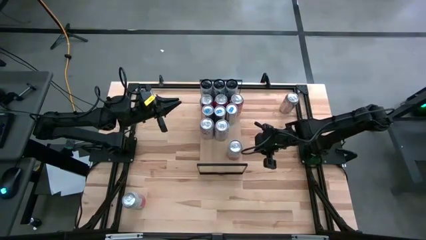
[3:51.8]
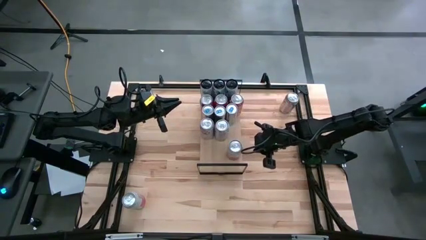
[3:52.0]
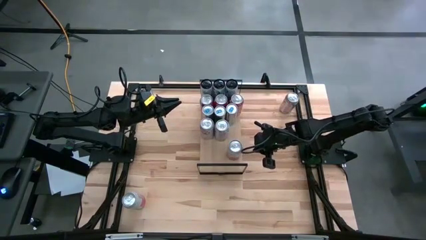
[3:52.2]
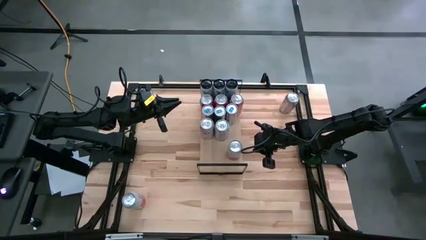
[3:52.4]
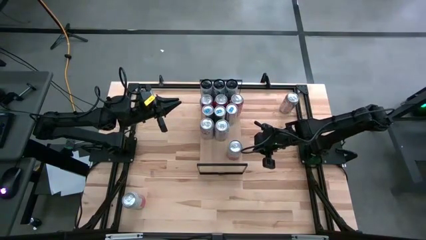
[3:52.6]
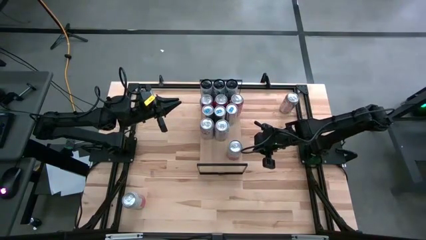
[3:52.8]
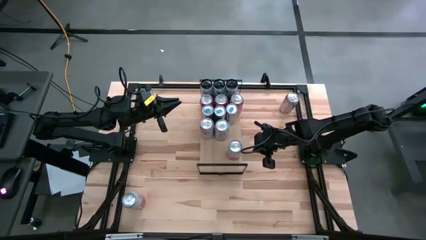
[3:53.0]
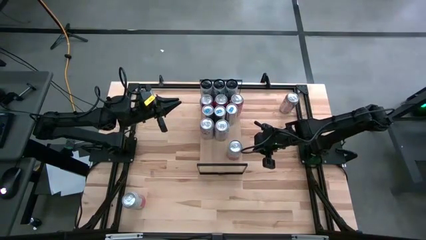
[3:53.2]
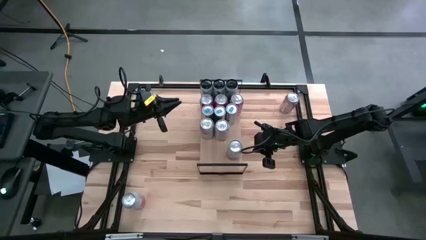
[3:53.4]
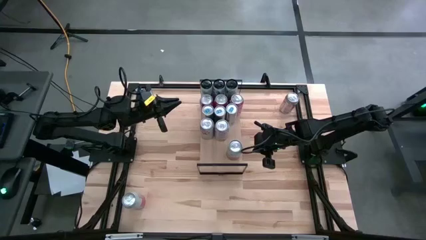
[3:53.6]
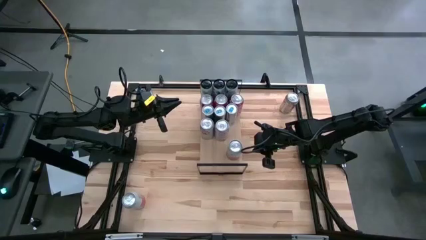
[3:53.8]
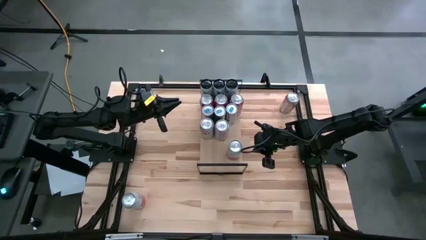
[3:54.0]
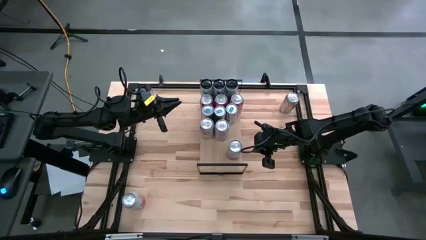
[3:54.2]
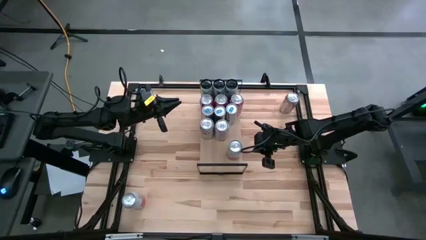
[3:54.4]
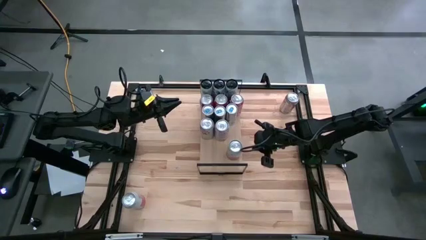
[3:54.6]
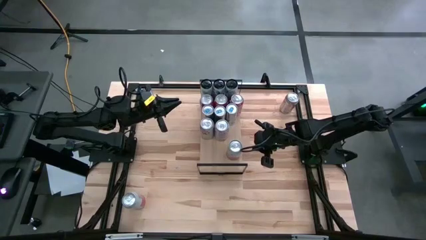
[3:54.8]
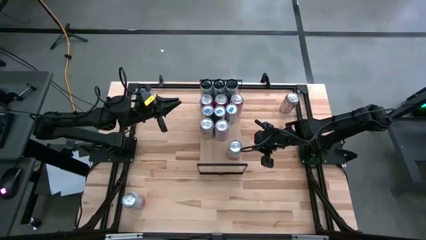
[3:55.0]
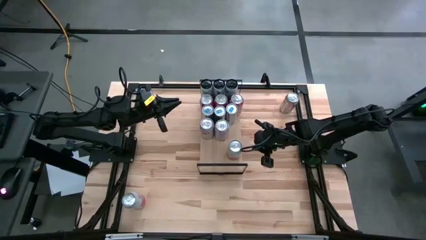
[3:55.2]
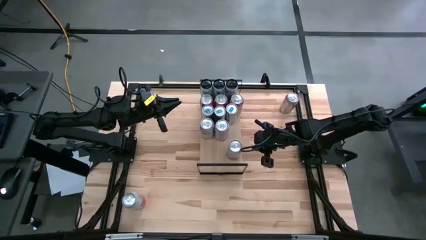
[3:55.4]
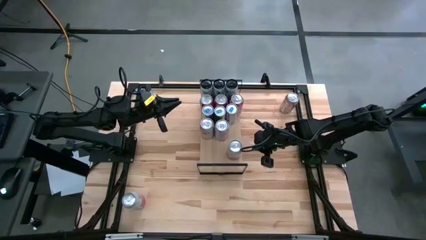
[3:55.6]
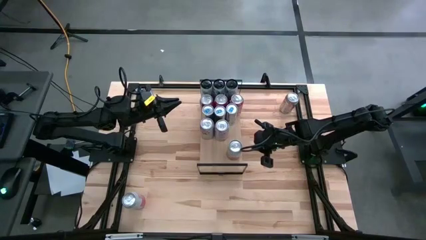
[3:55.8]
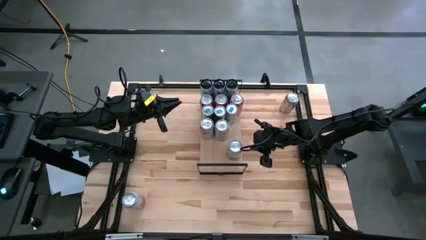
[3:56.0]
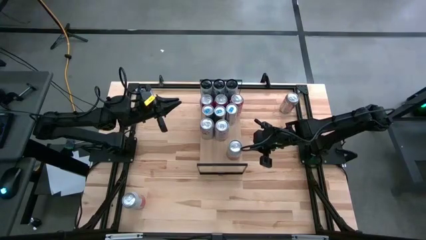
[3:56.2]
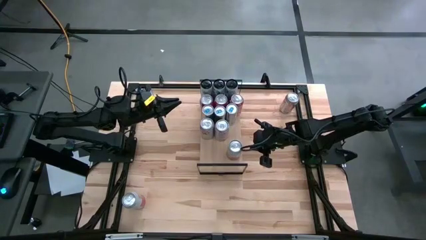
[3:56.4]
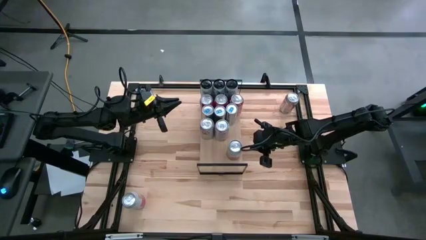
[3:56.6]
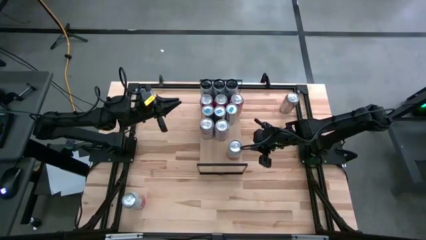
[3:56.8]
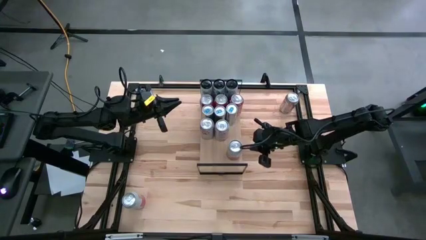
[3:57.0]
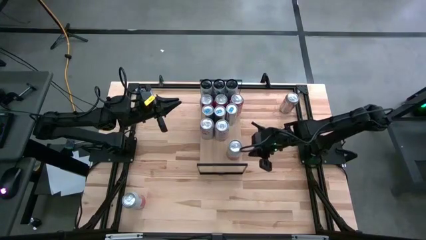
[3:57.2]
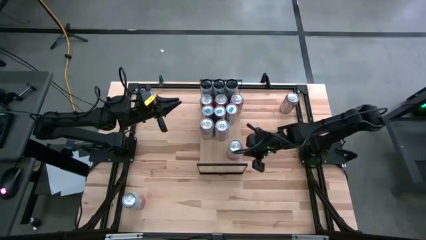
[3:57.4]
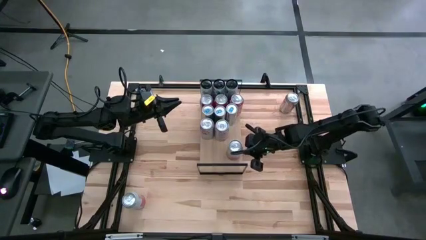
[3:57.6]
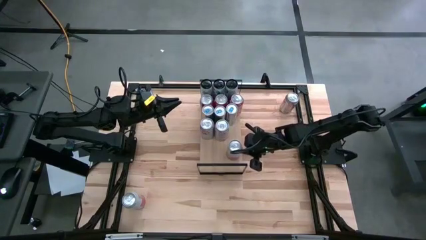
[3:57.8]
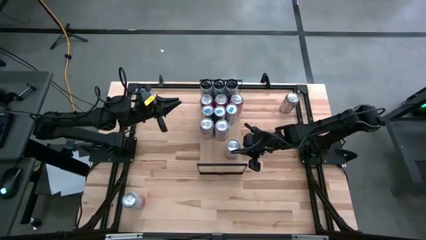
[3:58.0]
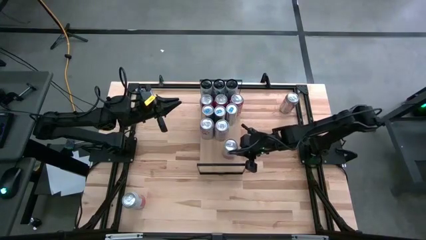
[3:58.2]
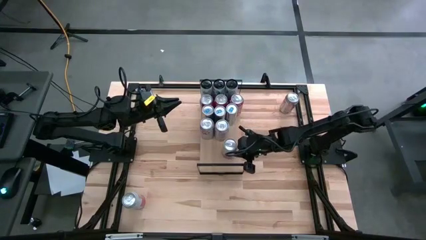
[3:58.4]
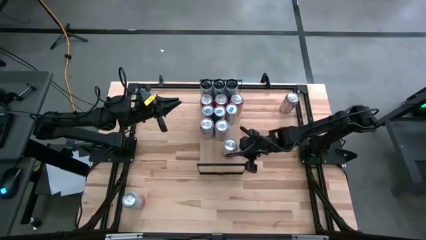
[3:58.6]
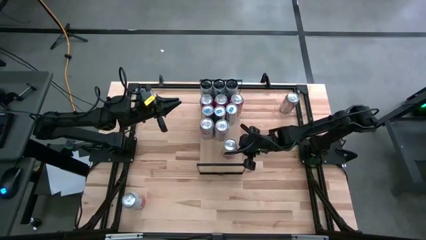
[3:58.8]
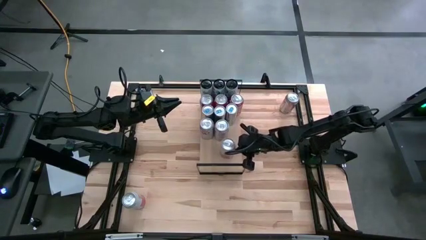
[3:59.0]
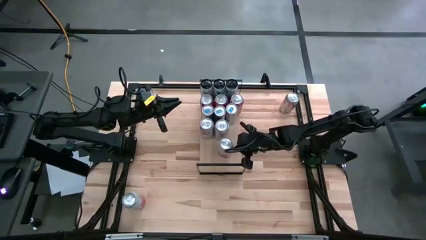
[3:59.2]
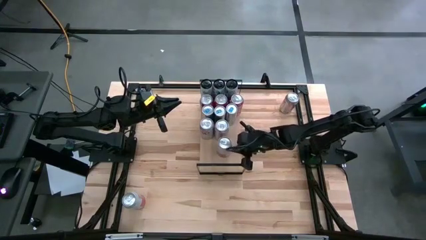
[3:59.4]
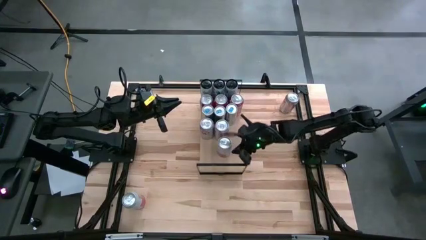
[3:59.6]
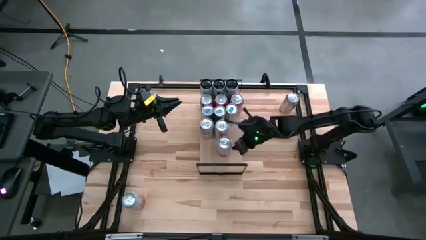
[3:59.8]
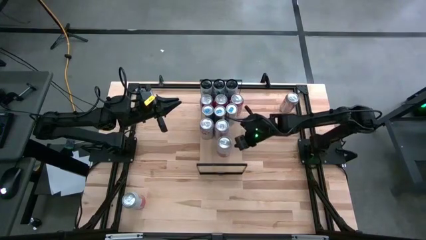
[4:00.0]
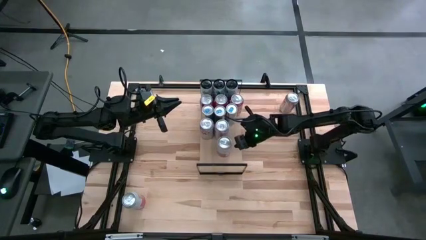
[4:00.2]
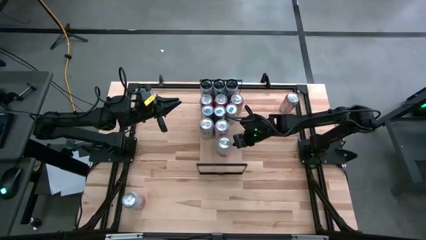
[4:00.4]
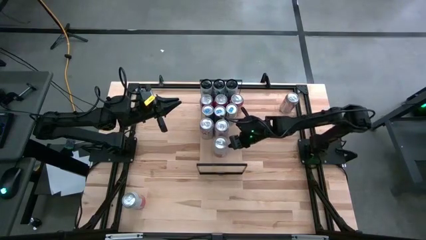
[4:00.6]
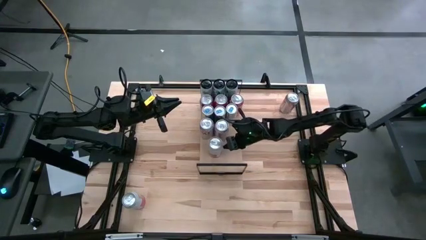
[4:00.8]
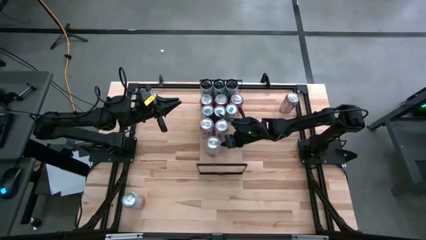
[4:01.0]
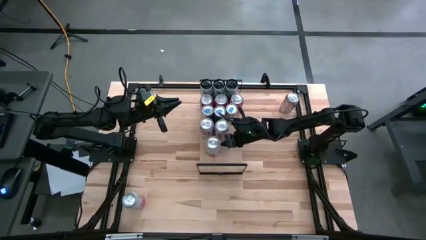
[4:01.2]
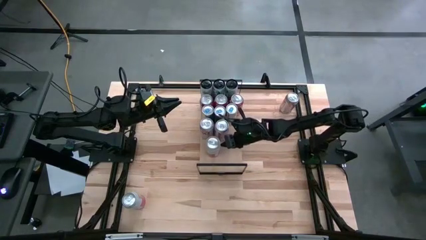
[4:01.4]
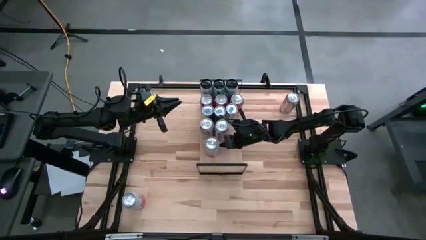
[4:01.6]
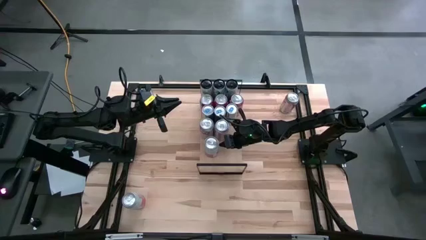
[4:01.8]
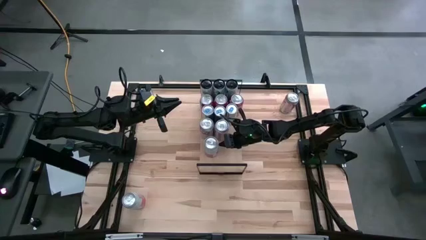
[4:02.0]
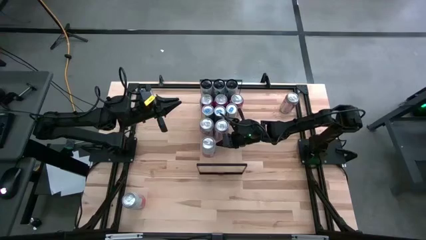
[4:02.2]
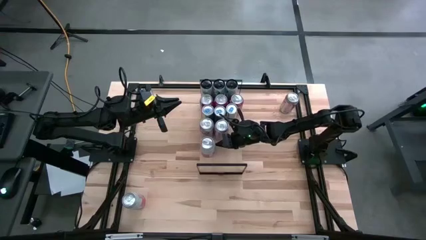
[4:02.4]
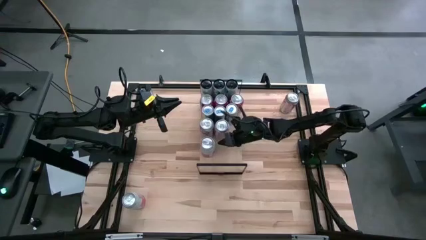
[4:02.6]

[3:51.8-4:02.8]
Task: Place canned beverage on shelf
Put the top pink-white soda can on the shelf

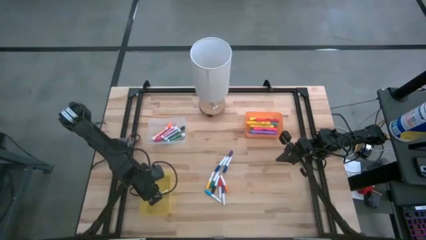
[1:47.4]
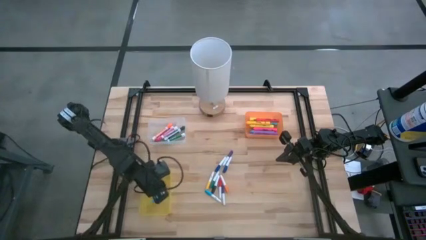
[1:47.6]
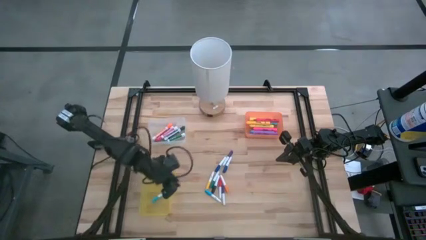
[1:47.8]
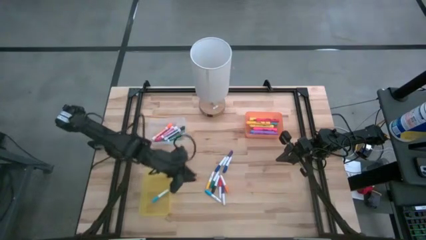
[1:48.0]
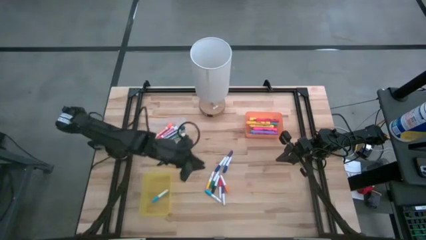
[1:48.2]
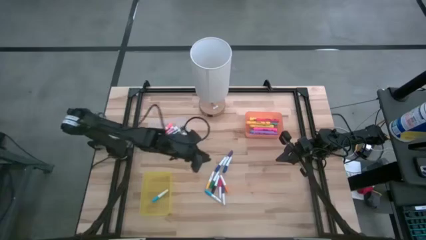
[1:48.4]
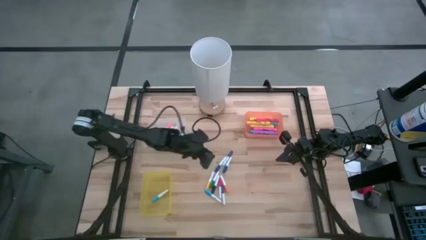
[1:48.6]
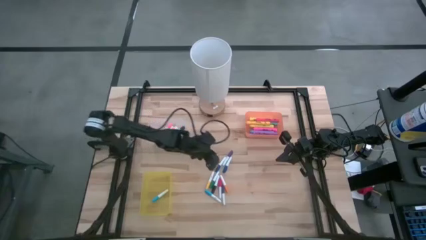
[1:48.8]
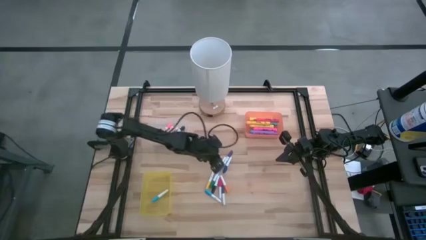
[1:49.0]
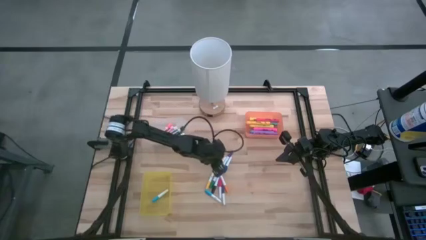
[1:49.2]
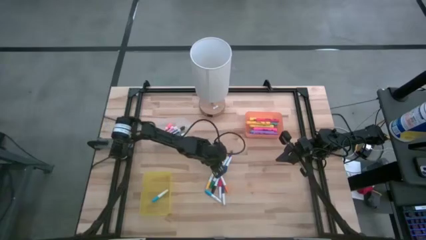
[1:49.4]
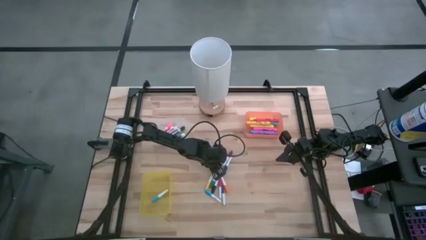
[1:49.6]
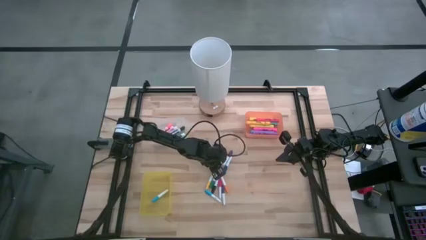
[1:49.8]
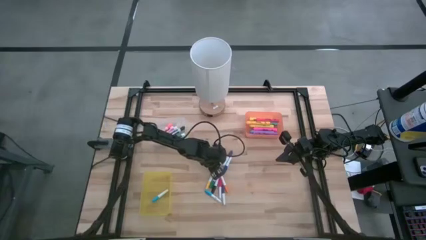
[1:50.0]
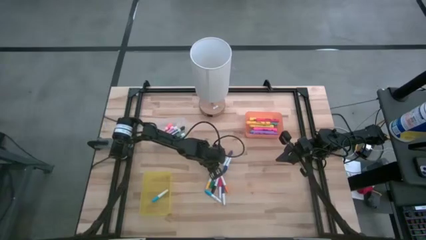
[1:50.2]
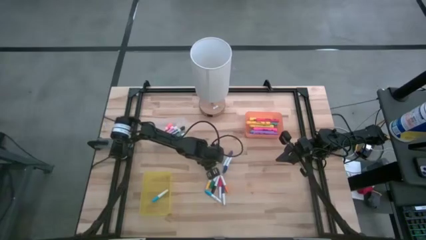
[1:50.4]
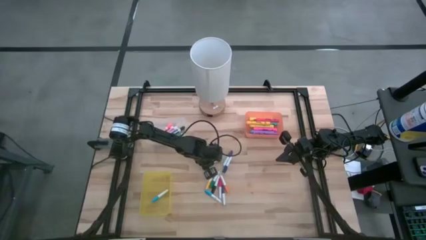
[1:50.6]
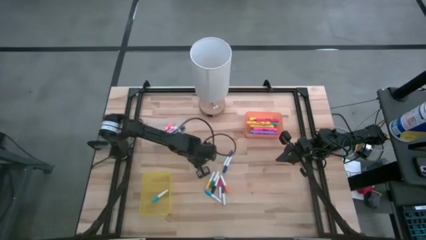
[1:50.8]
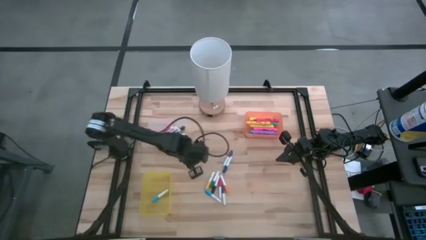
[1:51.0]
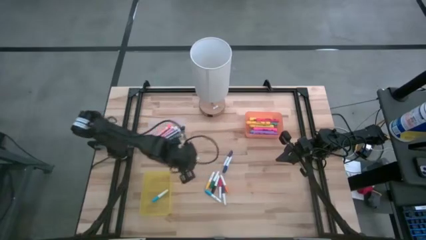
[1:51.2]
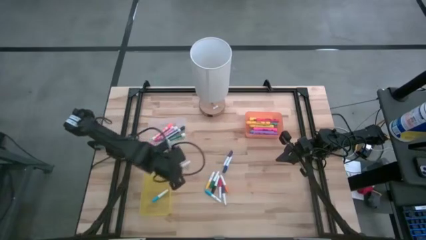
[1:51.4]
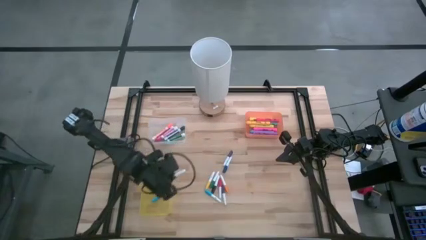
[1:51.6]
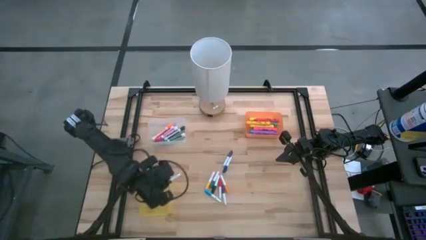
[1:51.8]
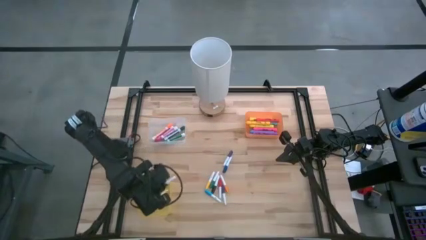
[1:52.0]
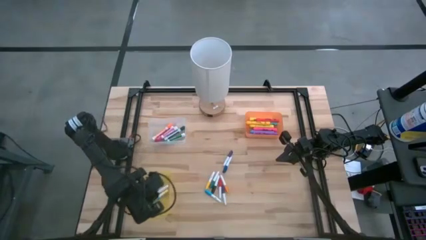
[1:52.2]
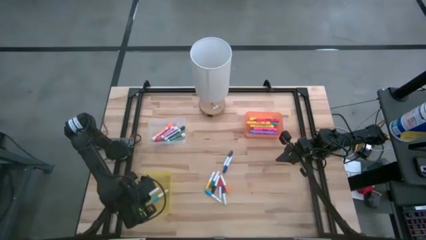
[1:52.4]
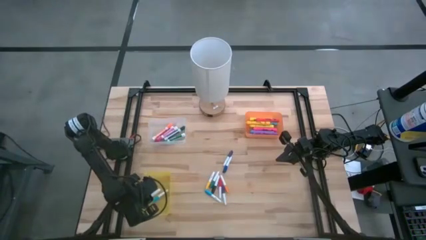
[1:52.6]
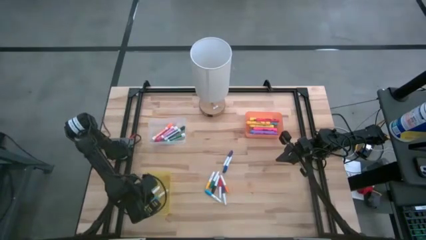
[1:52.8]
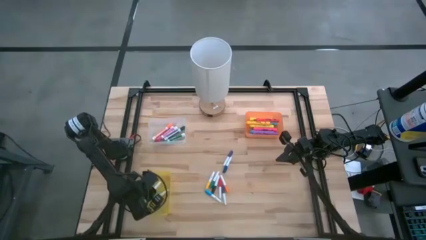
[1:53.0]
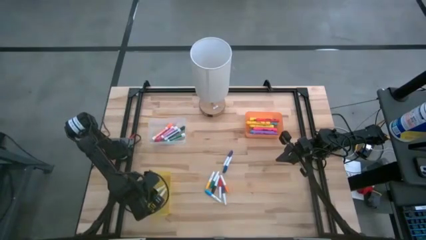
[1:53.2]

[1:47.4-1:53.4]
Task: Pick & Place Markers
Put the left small blue highlighter pen into the yellow bin
